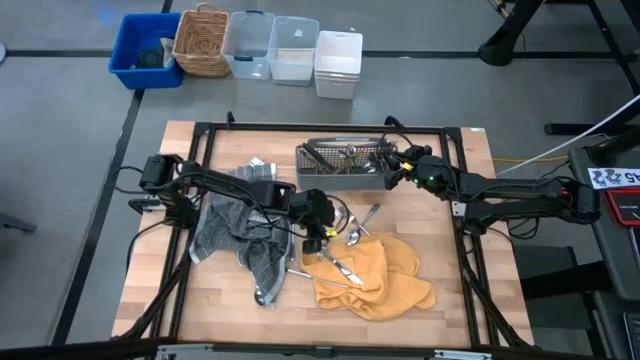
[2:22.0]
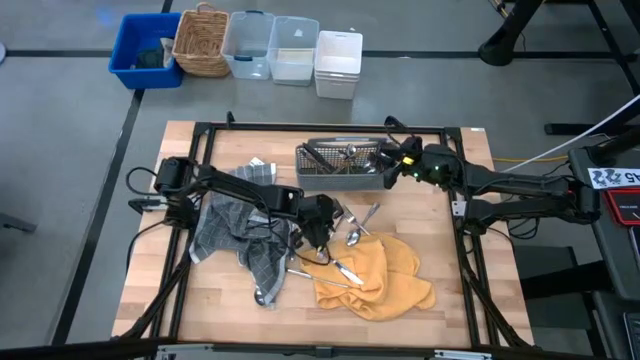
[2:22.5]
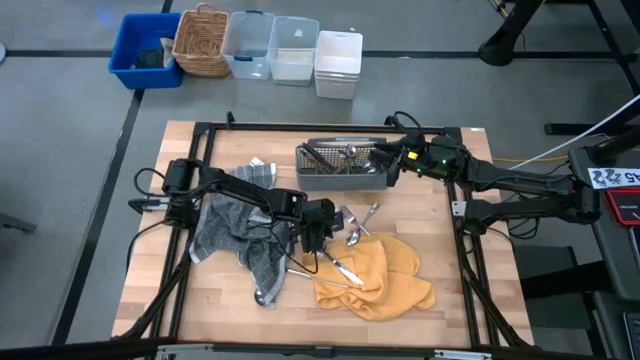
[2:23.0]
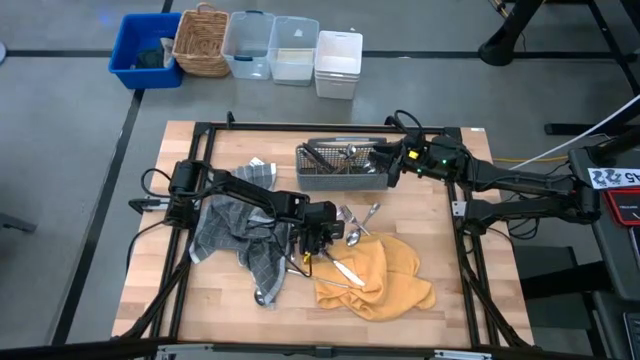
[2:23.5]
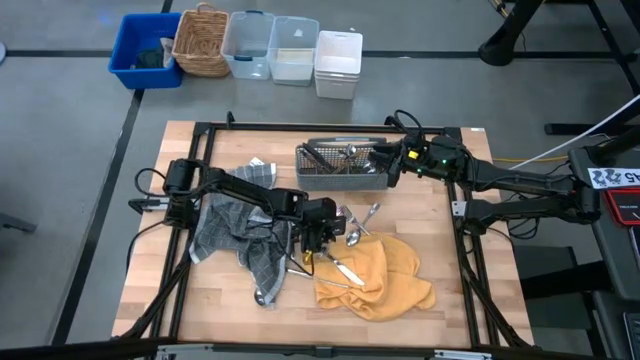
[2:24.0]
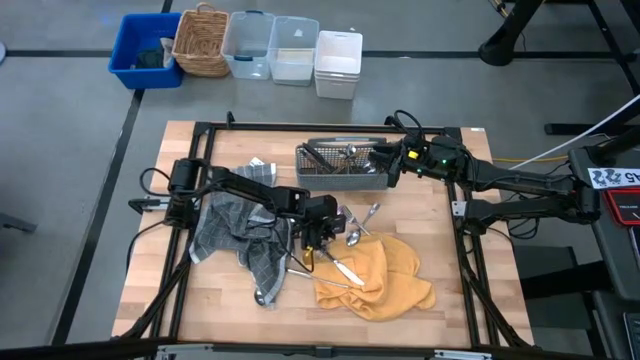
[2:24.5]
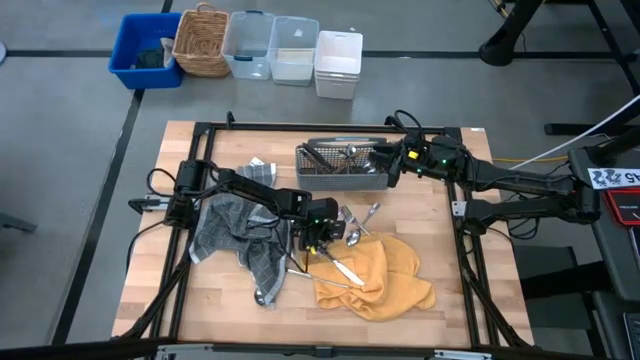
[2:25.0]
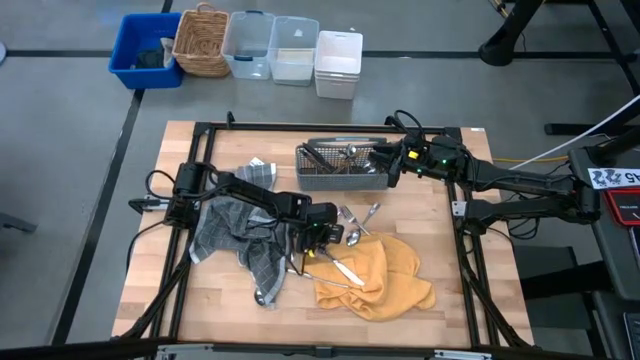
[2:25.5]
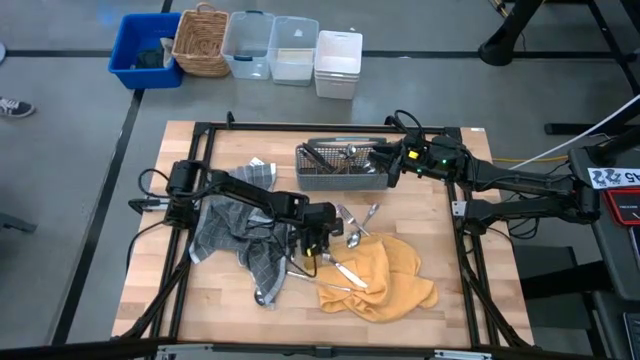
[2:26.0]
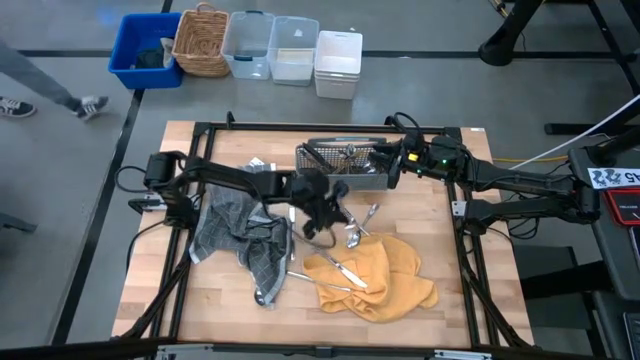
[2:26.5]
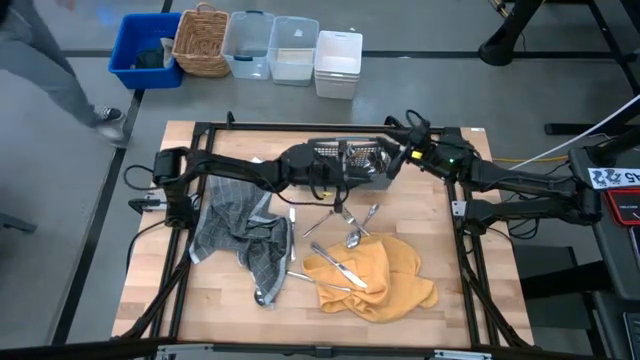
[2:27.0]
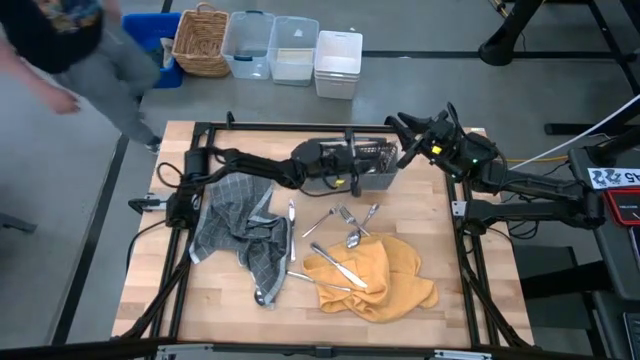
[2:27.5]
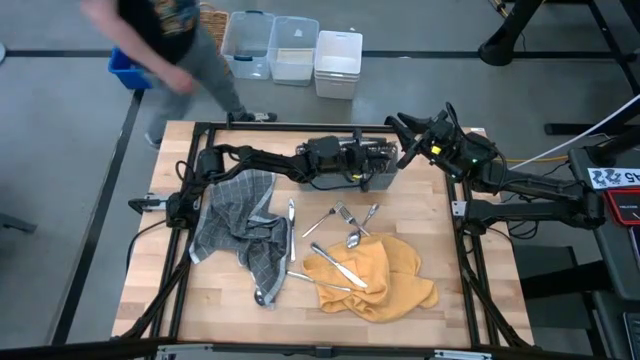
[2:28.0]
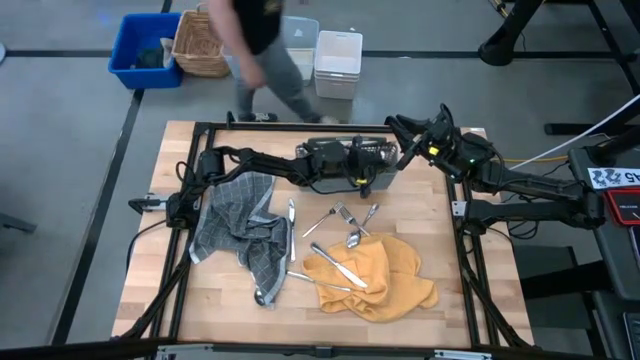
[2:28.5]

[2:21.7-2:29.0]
Task: Sort silverware
Put the silver fork into the gray utensil holder

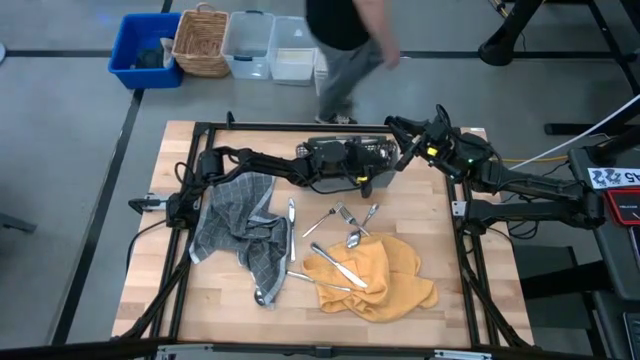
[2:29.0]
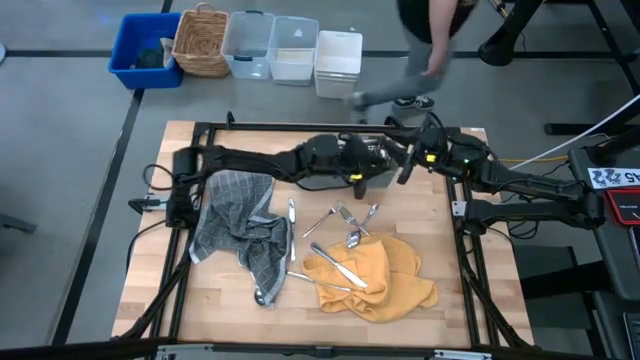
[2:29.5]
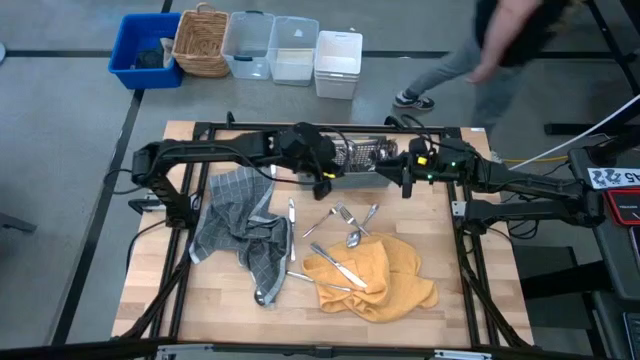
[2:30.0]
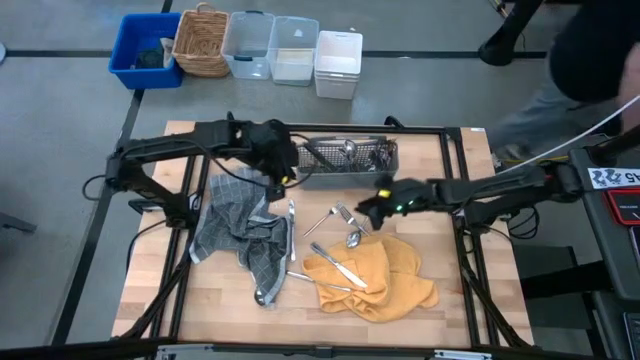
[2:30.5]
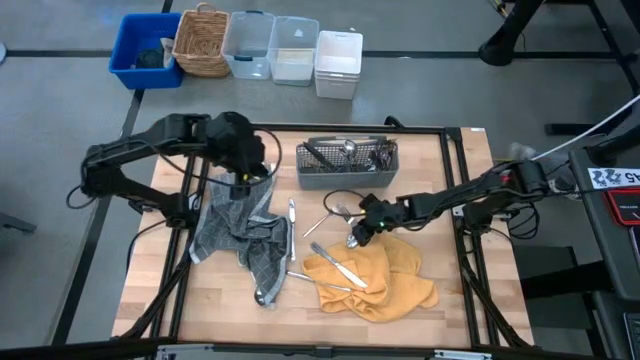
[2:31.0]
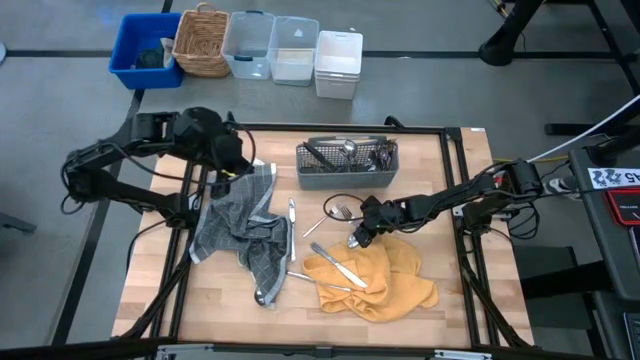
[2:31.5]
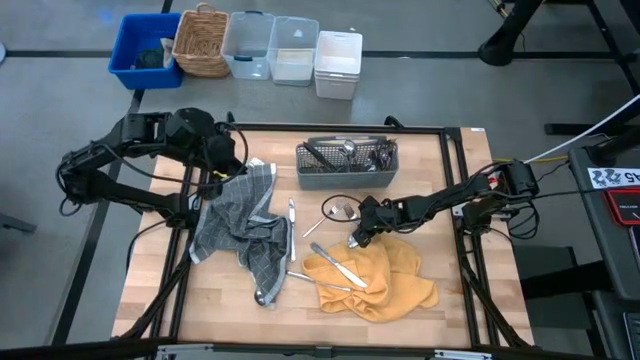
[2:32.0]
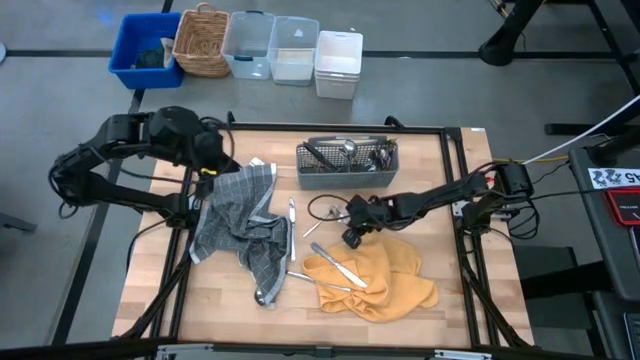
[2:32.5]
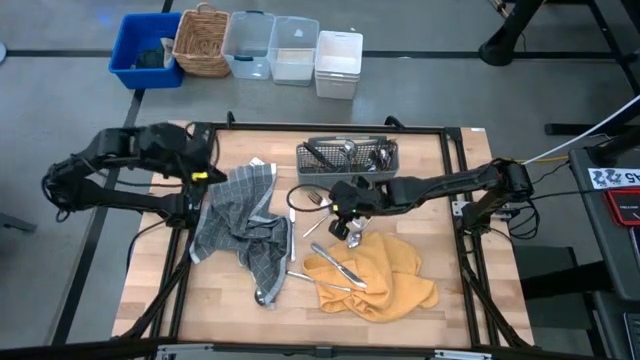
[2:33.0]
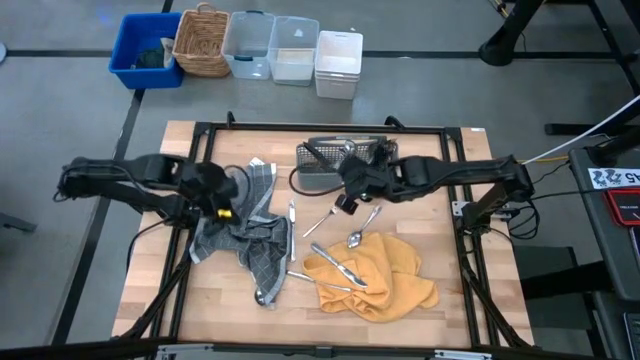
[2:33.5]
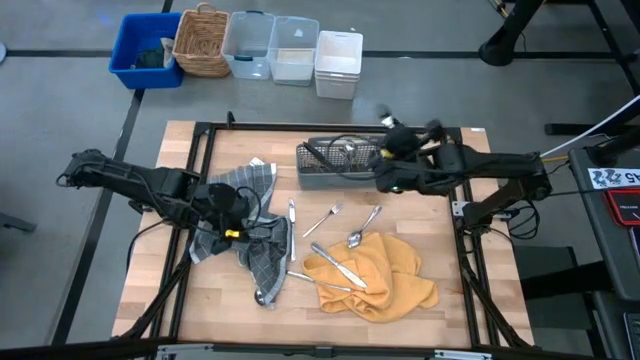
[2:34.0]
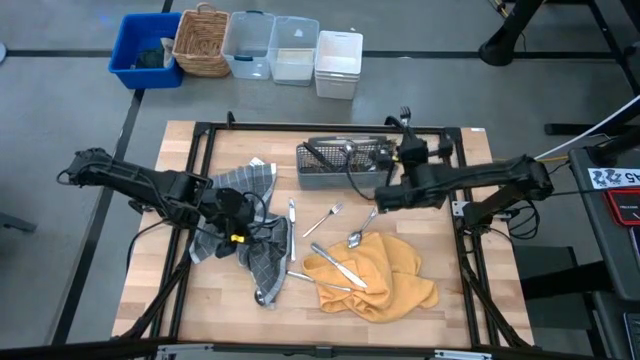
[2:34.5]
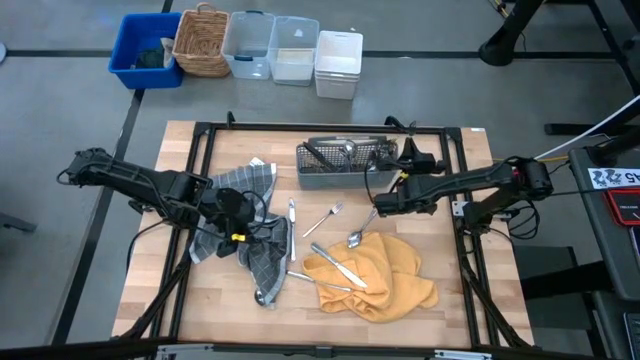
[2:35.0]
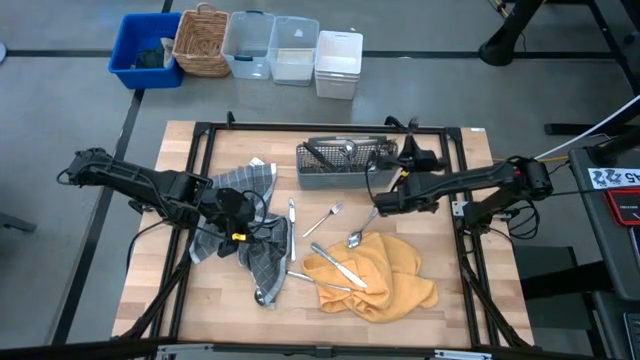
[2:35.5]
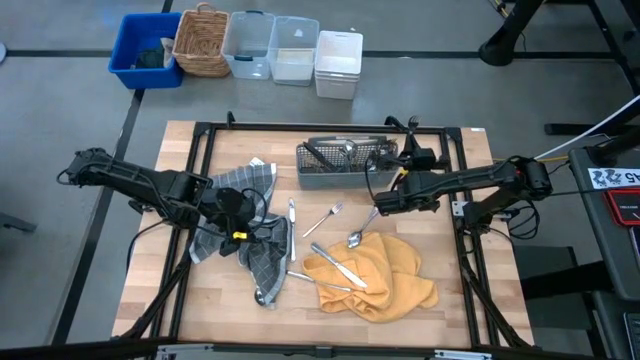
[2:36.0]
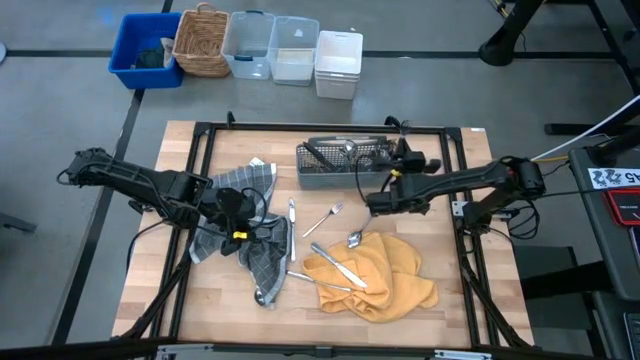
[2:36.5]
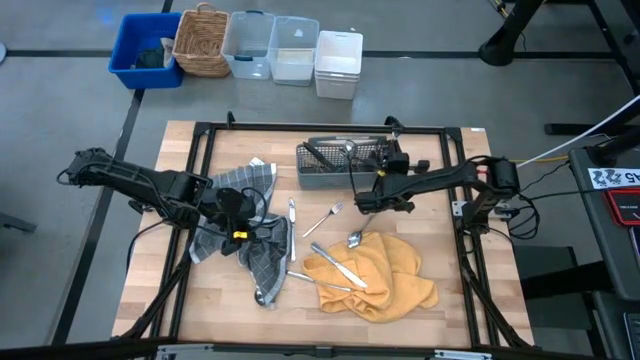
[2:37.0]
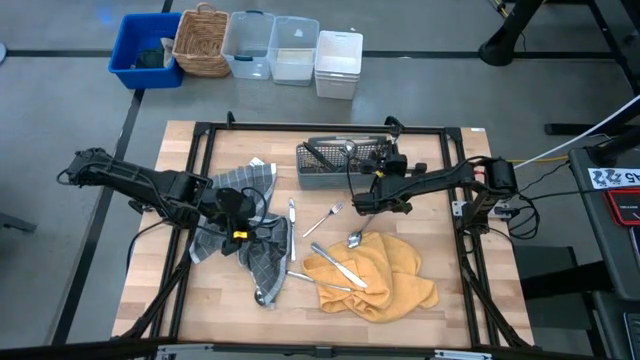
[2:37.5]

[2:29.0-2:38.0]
Put the silver fork into the gray silverware basket

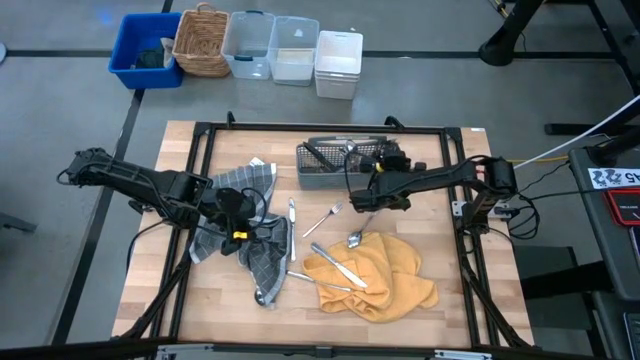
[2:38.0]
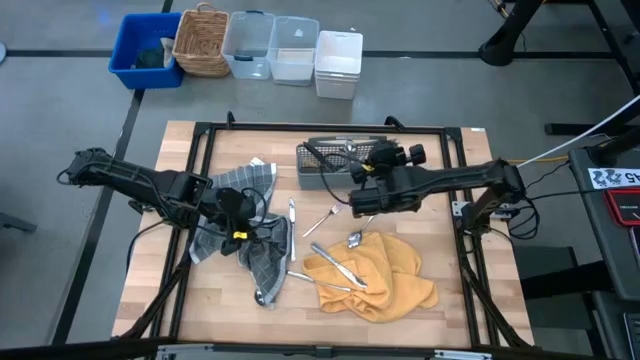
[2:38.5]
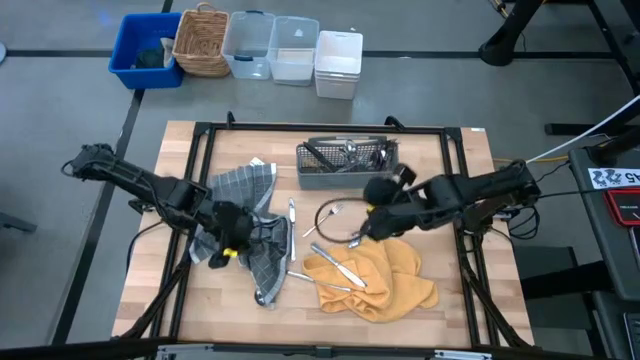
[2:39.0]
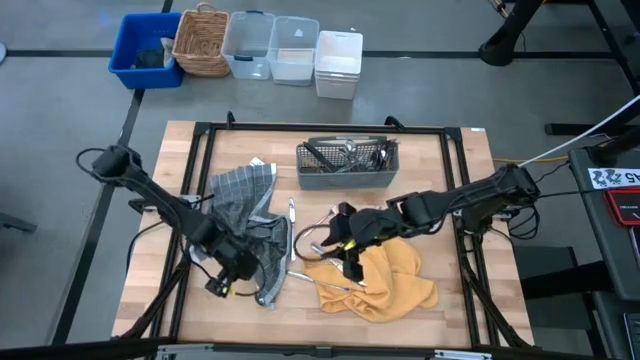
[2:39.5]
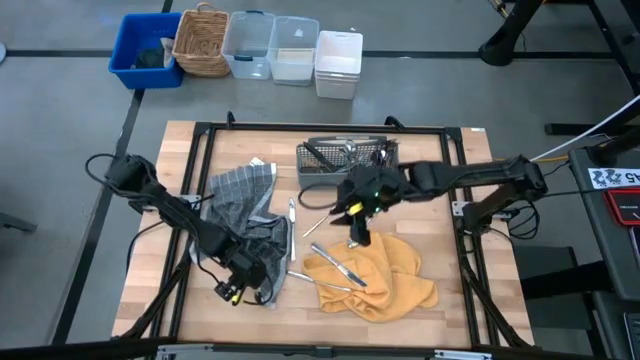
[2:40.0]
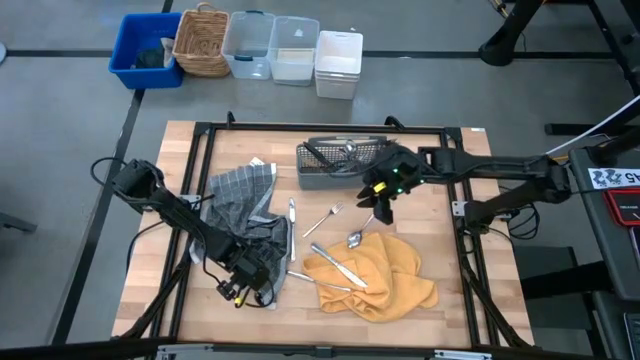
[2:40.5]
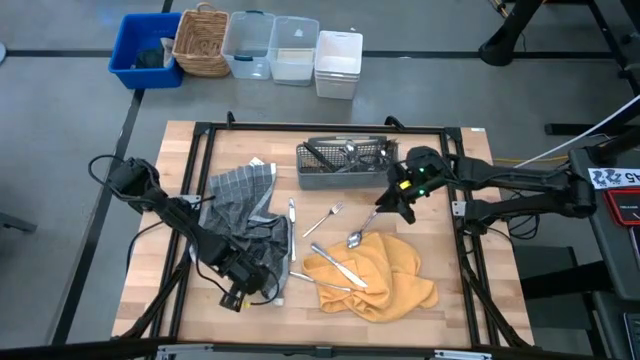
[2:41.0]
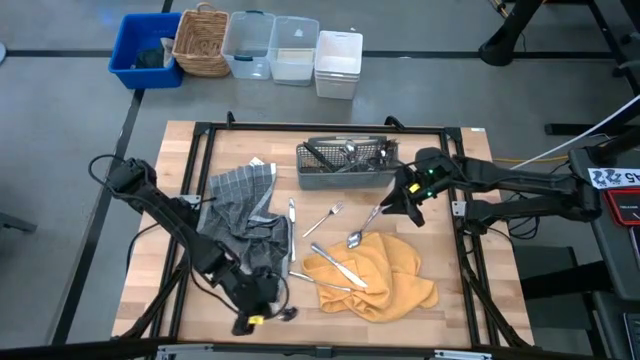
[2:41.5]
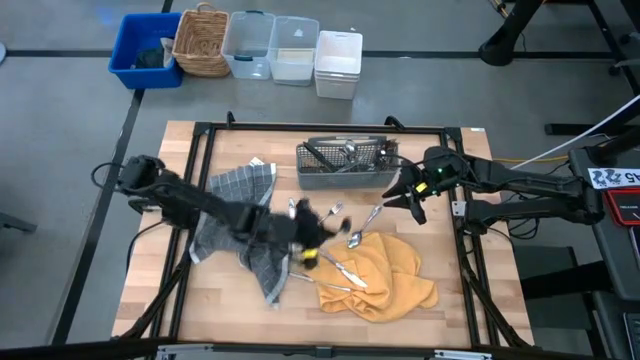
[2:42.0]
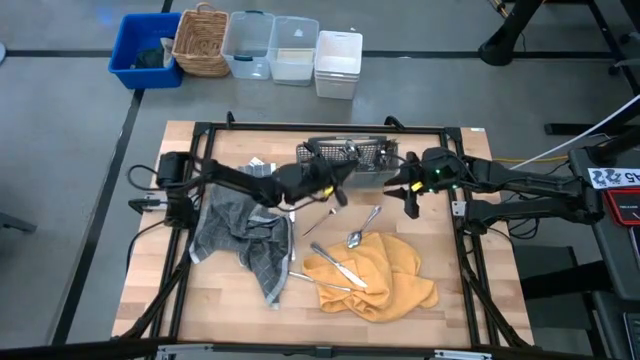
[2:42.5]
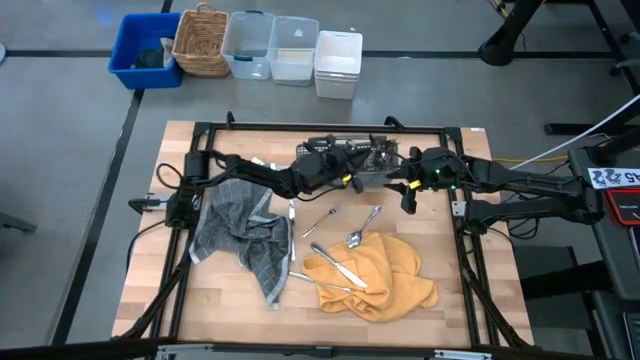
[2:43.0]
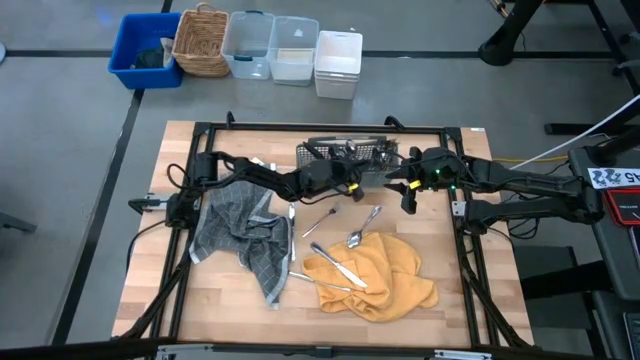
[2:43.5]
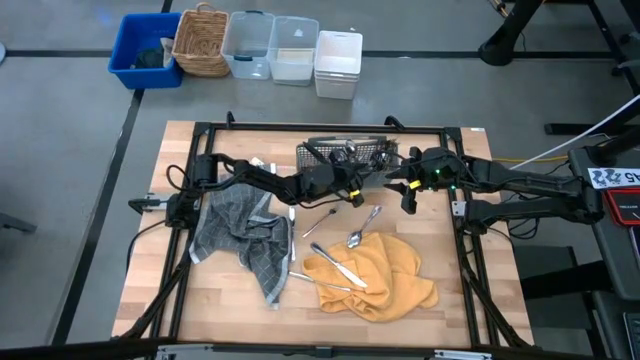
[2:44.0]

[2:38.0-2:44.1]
Put the silver spoon into the gray utensil holder
